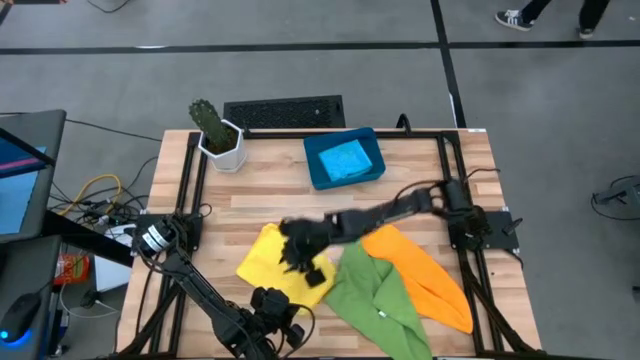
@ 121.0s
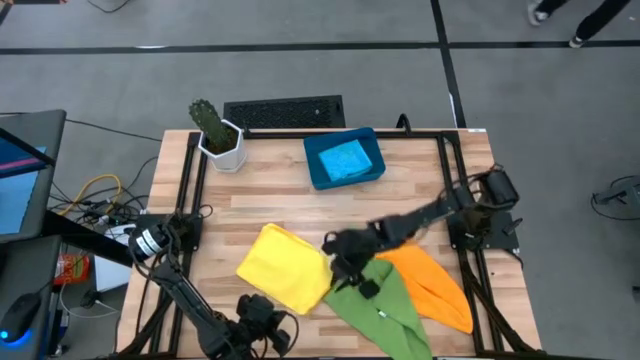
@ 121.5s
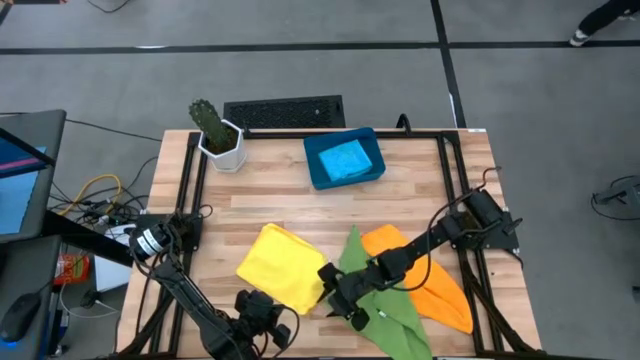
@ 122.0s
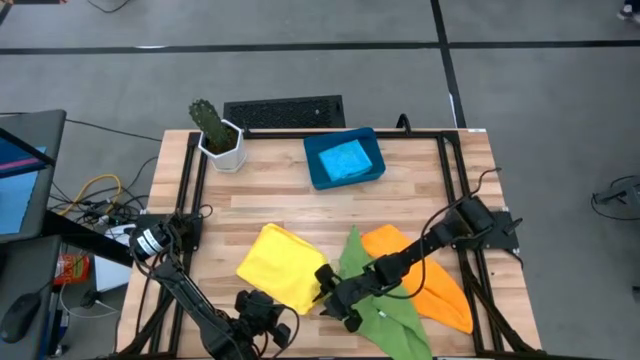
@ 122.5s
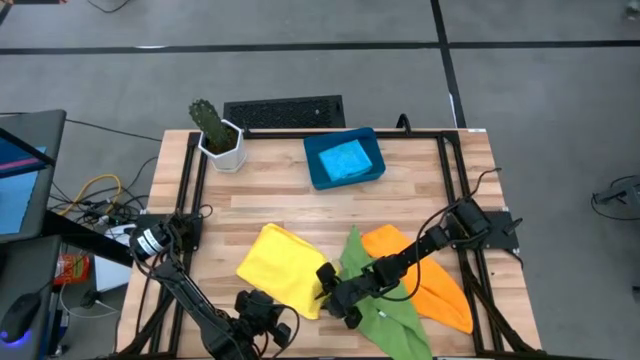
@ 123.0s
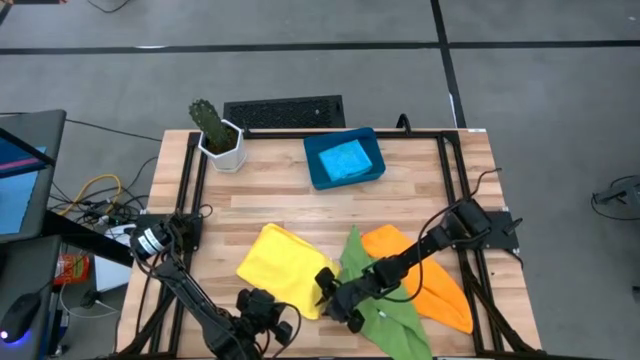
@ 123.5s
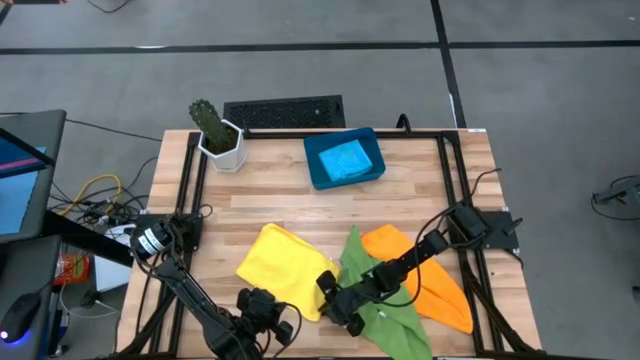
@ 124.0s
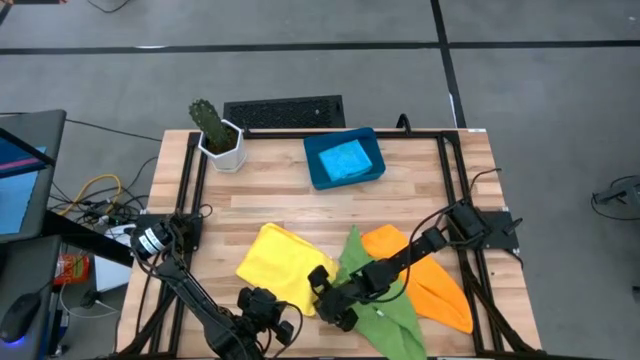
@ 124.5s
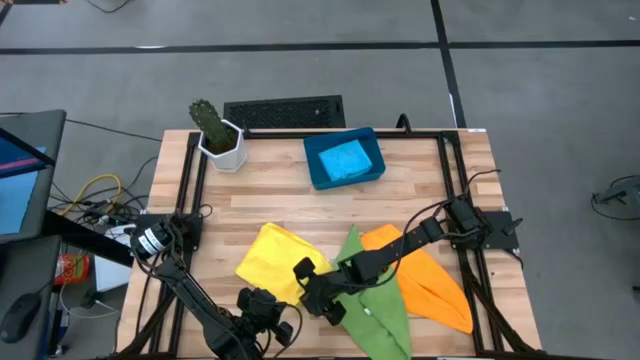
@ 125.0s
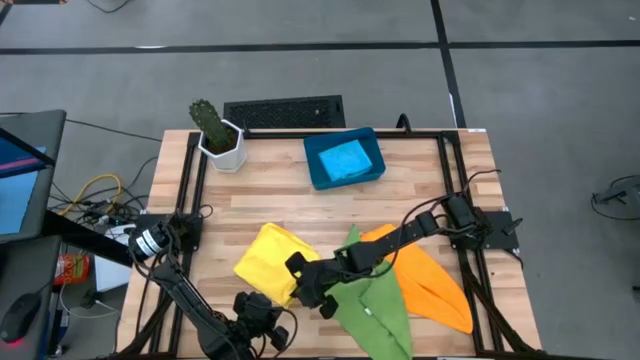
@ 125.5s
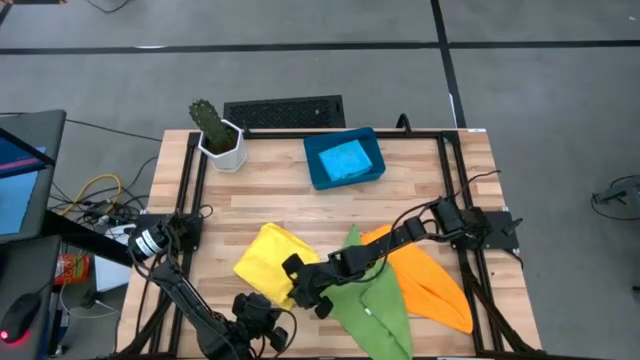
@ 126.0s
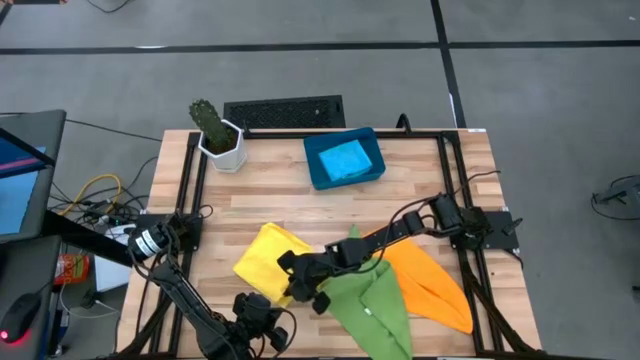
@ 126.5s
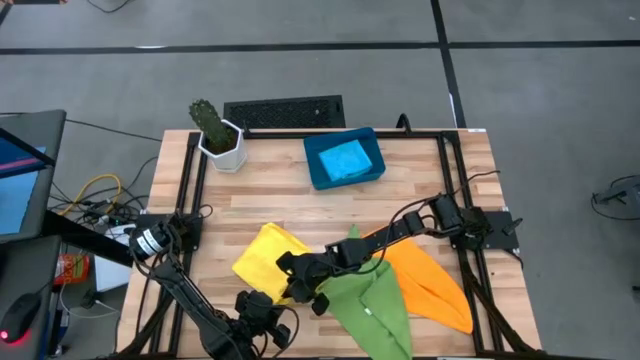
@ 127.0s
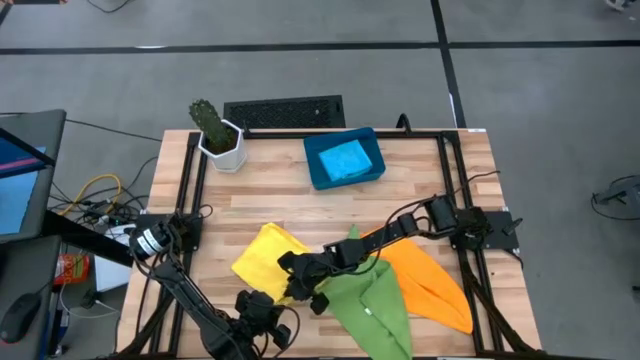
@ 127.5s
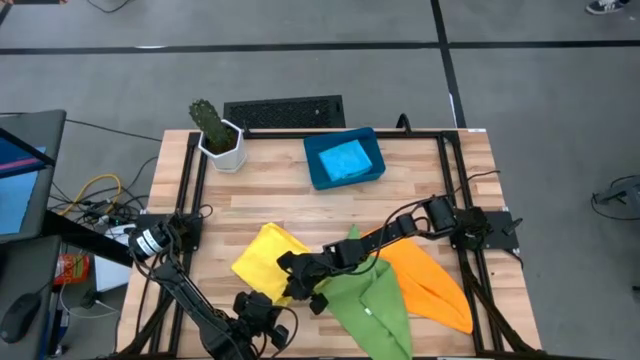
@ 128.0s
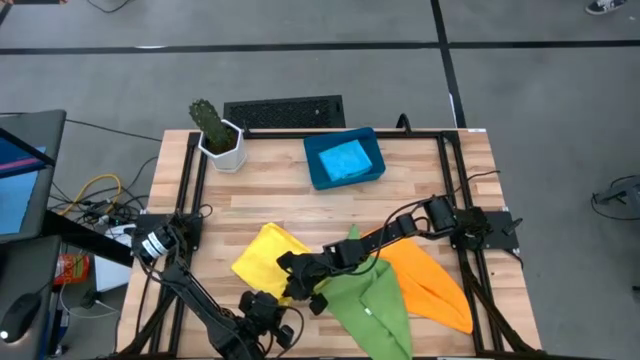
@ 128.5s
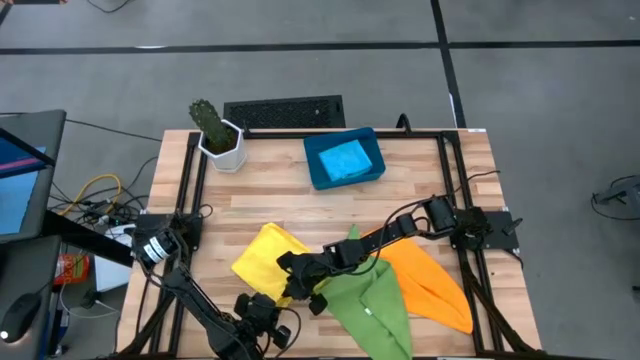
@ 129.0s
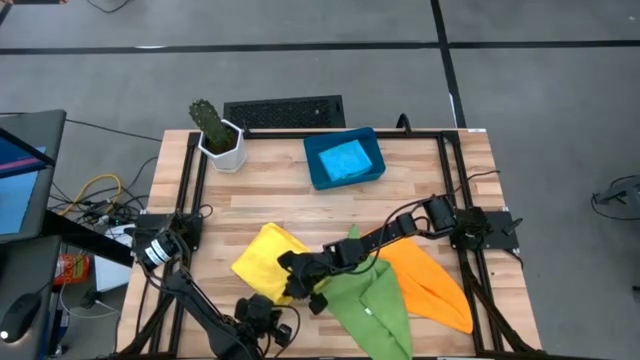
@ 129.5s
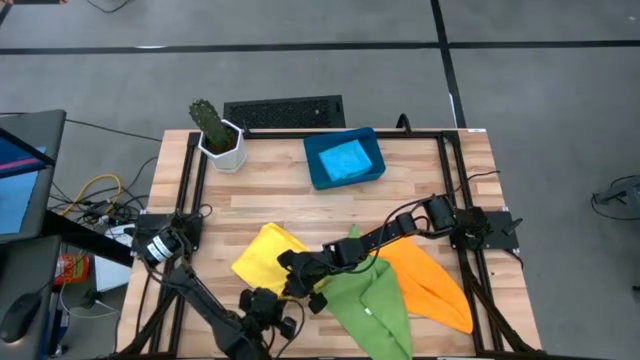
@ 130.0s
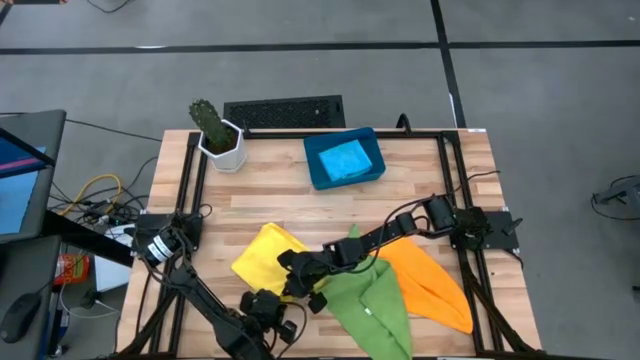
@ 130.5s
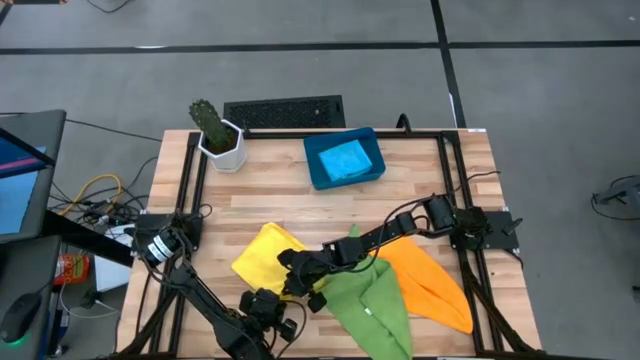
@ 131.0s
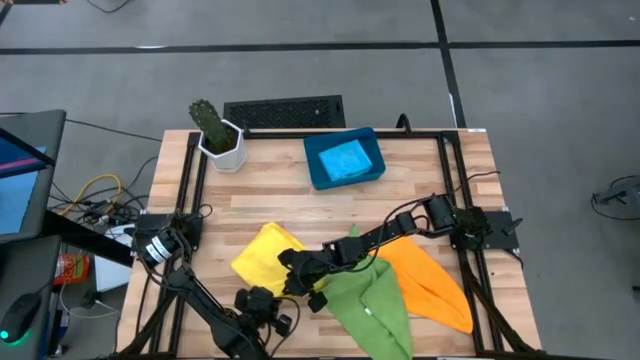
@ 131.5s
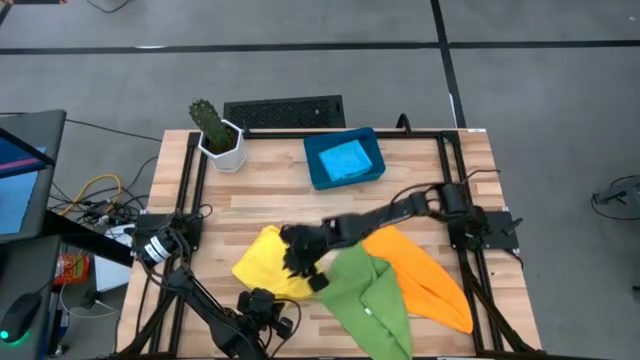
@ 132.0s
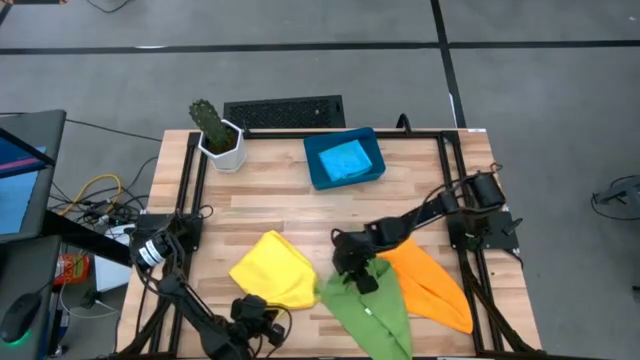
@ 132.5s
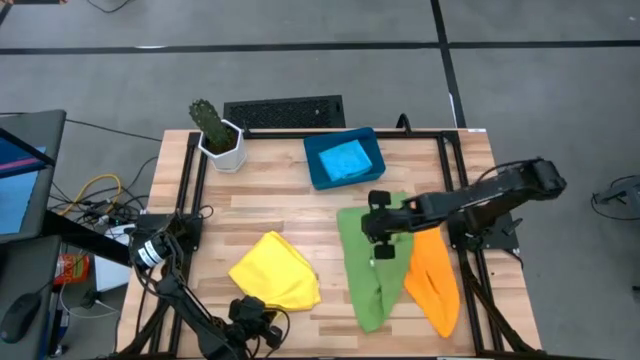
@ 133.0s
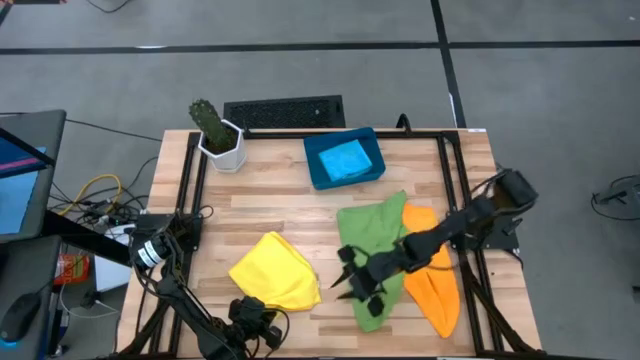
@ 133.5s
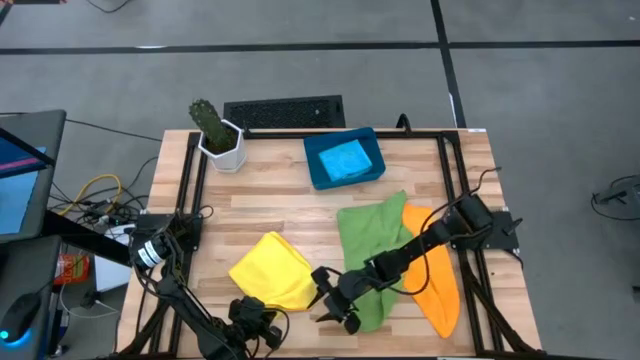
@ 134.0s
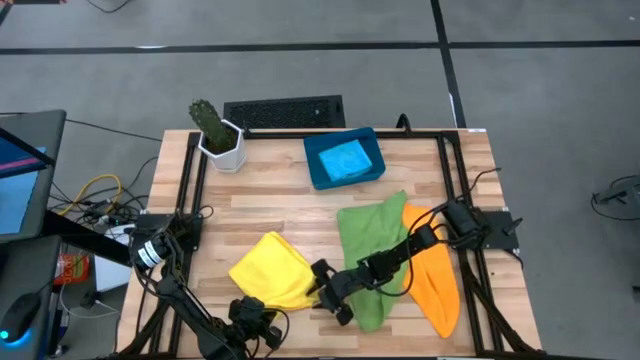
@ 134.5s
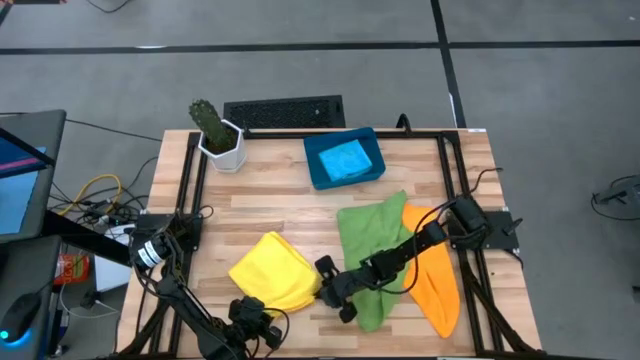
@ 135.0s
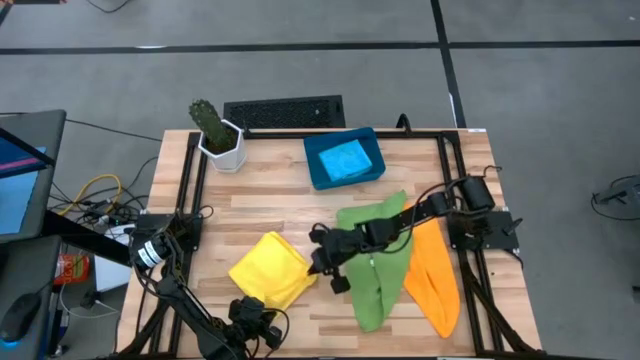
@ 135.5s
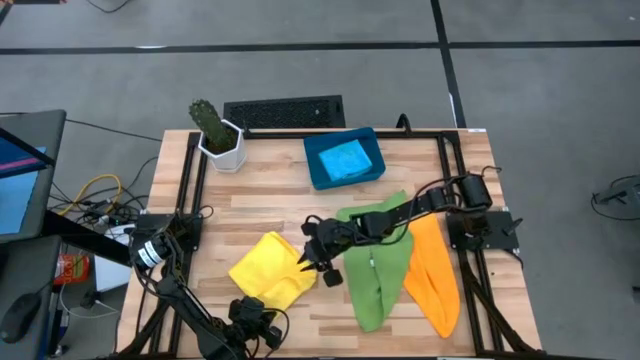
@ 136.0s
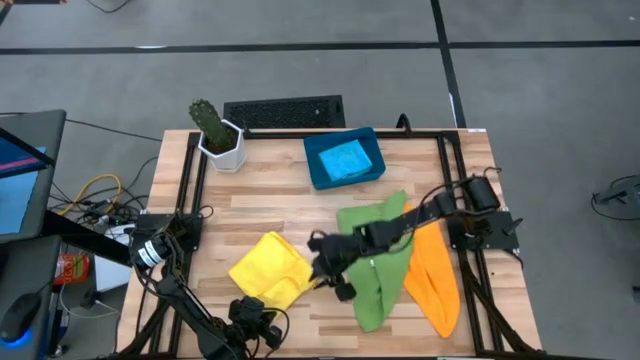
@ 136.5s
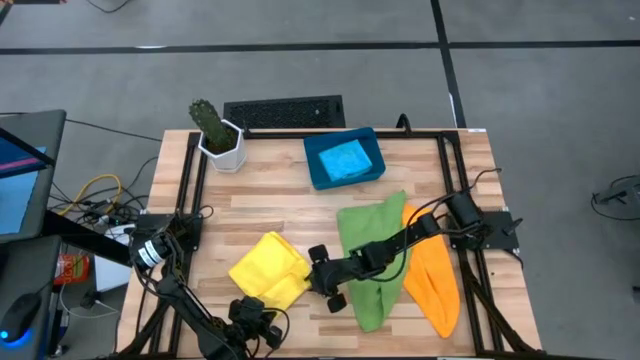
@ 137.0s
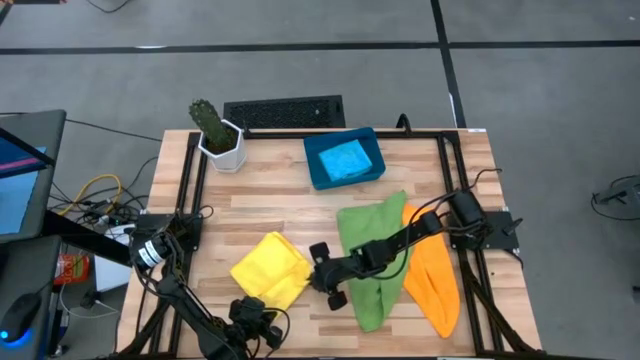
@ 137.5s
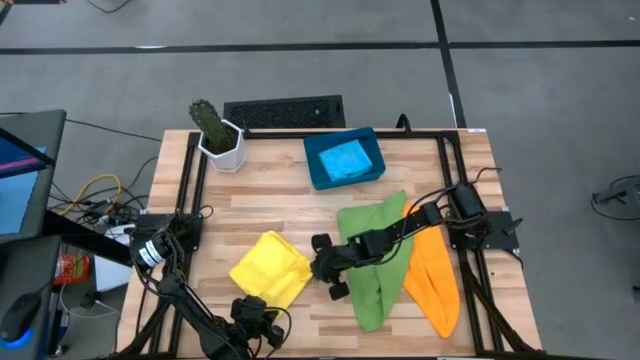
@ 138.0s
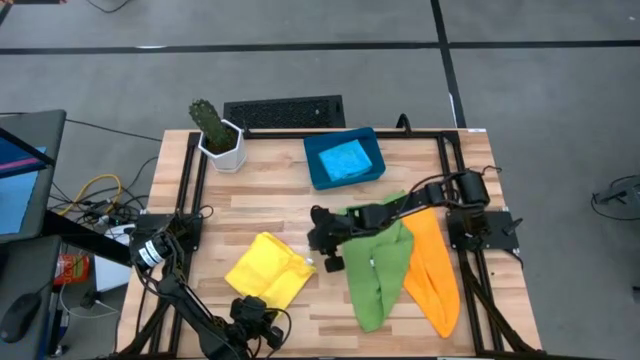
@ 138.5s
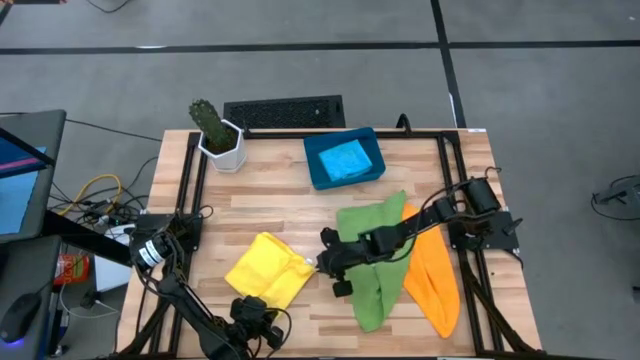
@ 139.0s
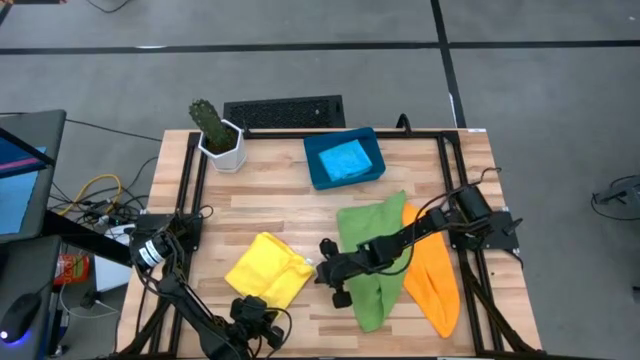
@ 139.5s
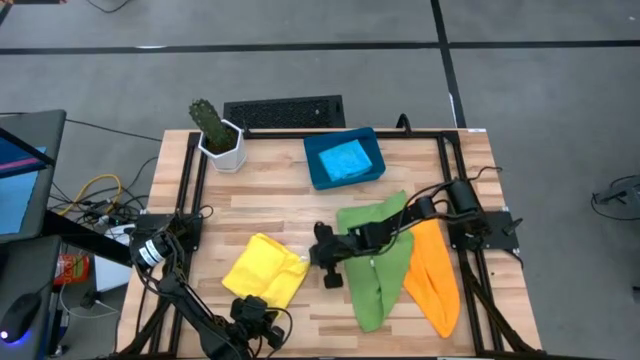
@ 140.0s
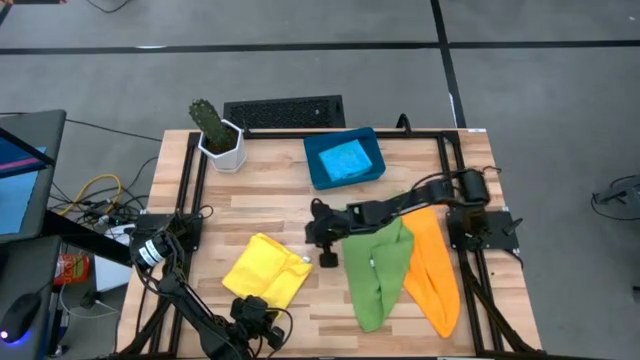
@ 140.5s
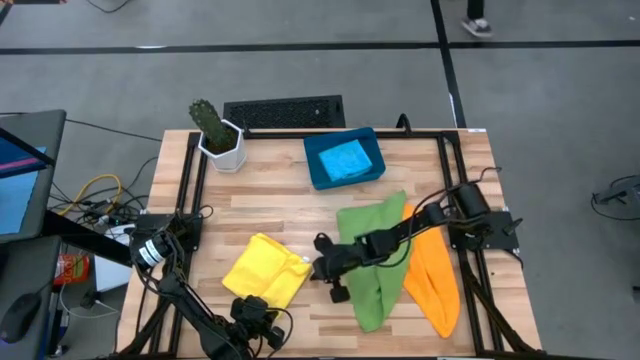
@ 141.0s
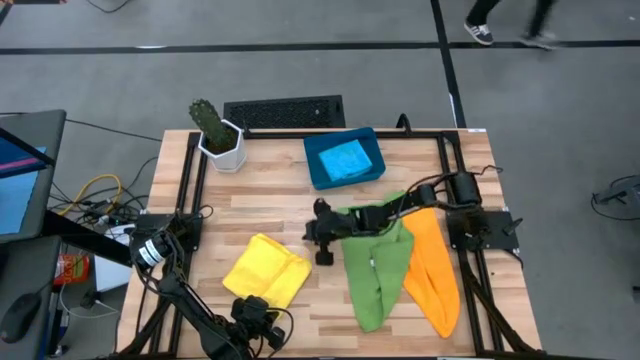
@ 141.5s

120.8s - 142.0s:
Task: Fold microfiber towels
Fold the yellow microfiber cloth

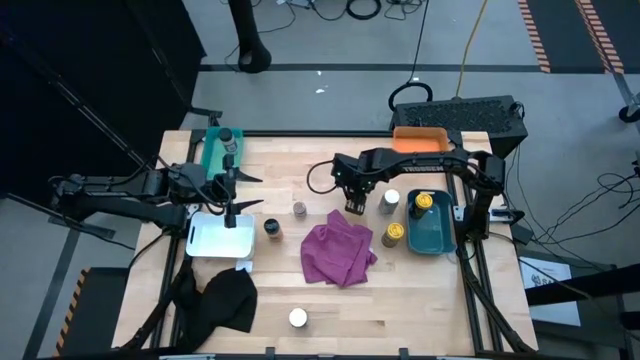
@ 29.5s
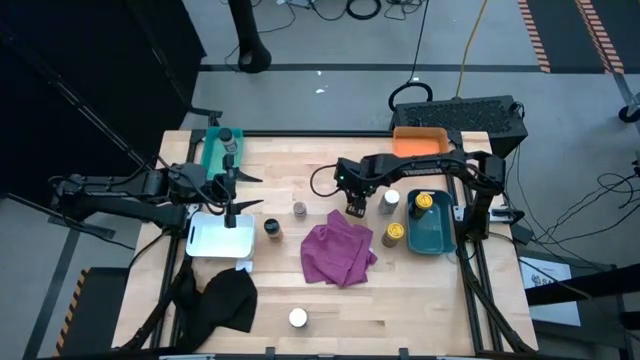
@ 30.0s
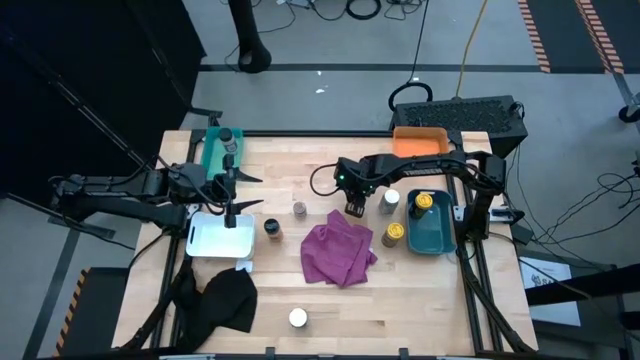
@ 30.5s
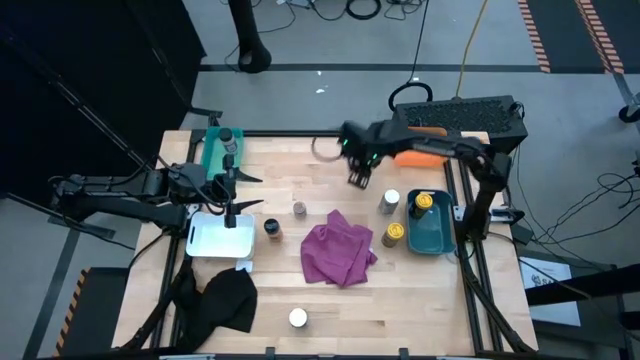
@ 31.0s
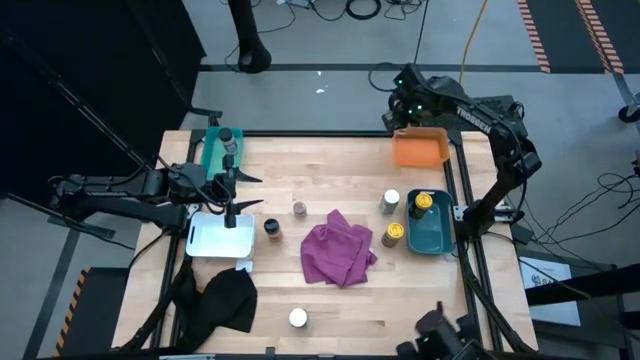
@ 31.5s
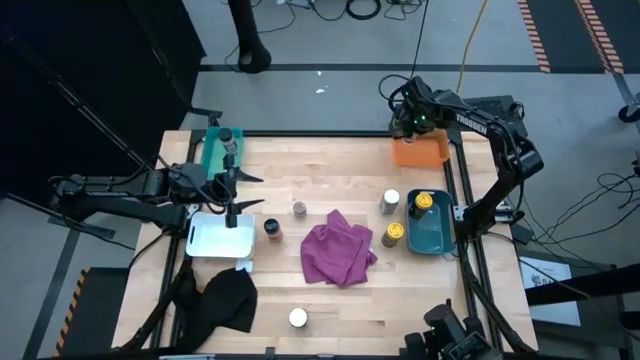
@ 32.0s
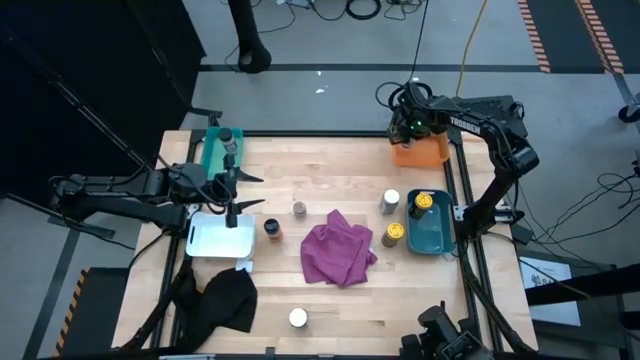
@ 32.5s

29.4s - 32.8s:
Task: Sort spices by type
Put the right brown seasoning bottle into the orange bin
